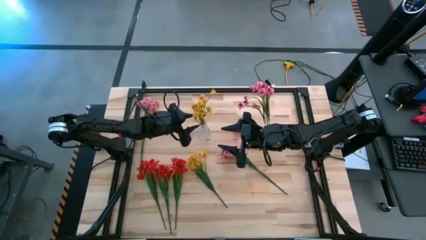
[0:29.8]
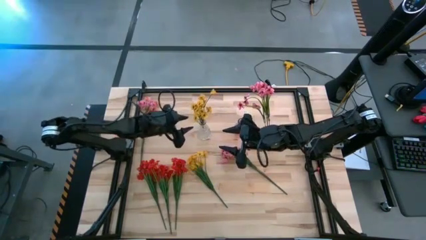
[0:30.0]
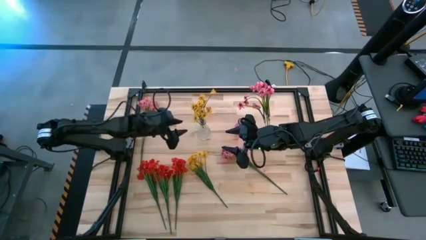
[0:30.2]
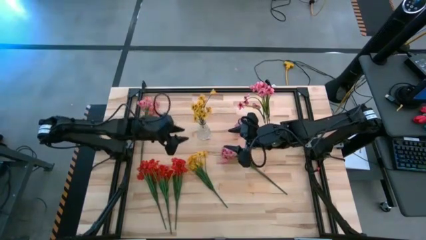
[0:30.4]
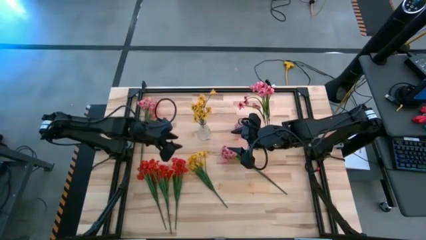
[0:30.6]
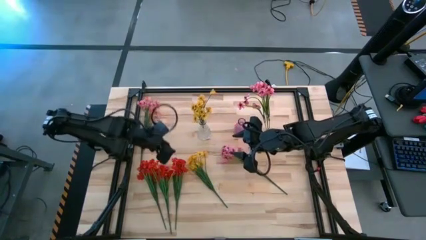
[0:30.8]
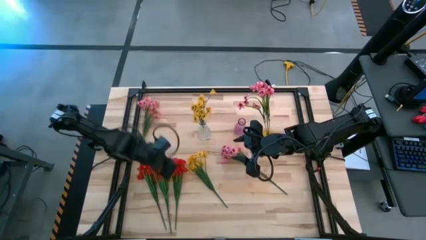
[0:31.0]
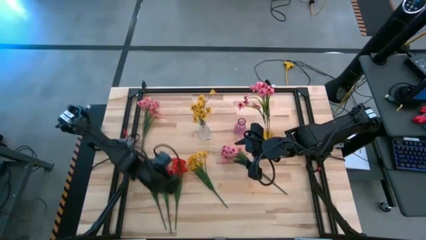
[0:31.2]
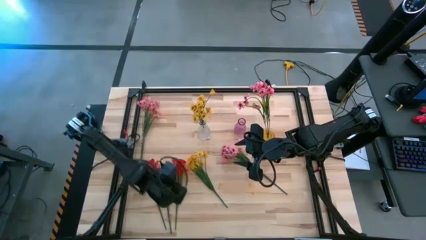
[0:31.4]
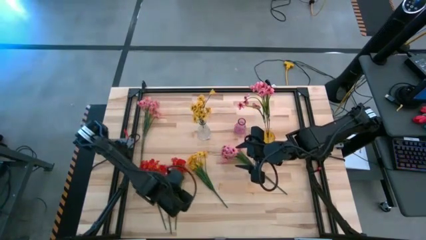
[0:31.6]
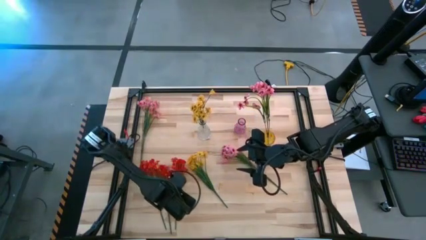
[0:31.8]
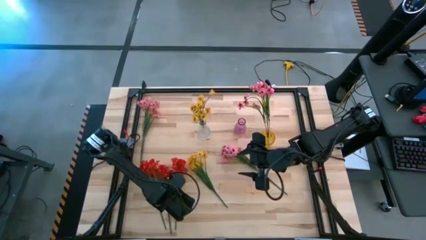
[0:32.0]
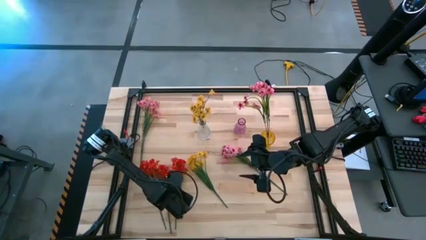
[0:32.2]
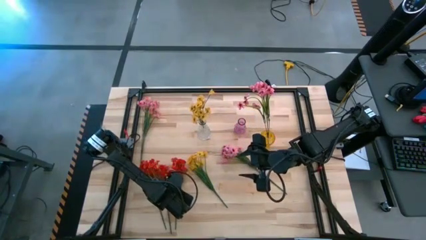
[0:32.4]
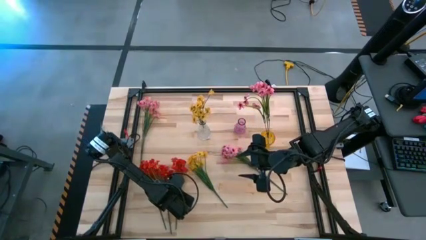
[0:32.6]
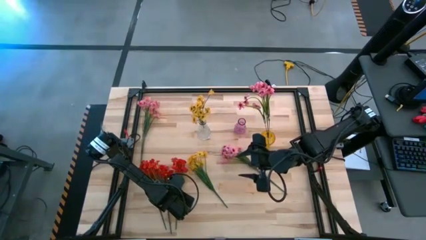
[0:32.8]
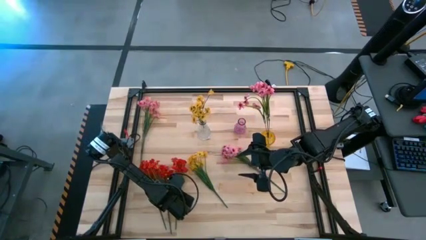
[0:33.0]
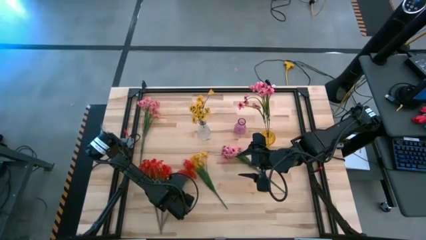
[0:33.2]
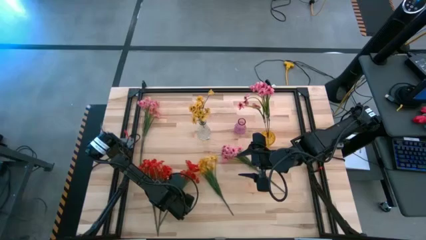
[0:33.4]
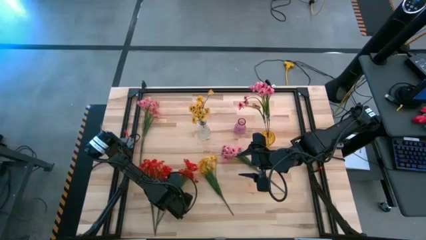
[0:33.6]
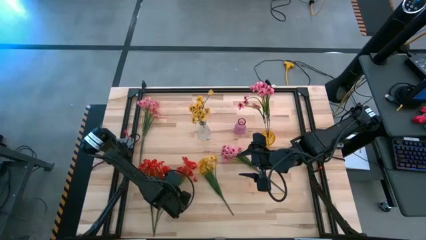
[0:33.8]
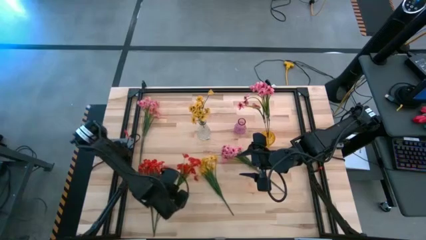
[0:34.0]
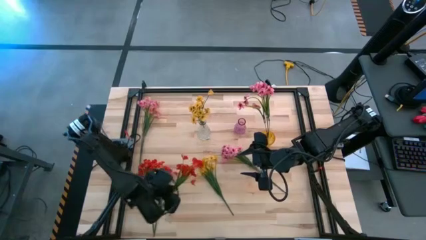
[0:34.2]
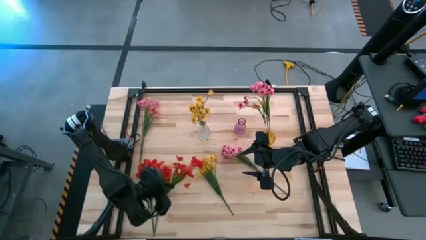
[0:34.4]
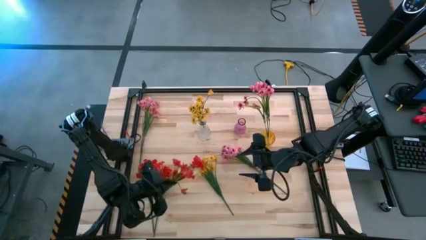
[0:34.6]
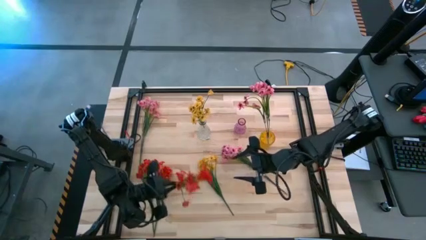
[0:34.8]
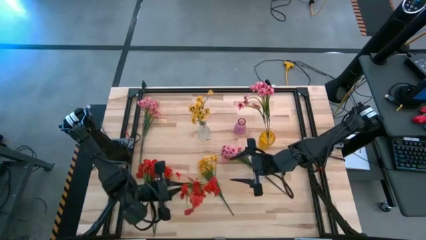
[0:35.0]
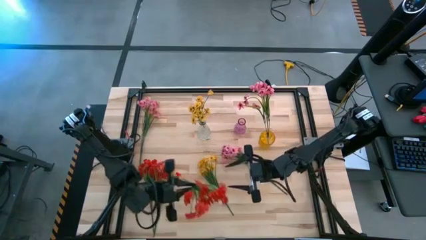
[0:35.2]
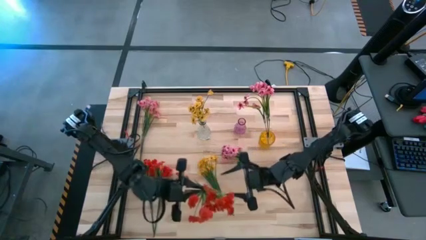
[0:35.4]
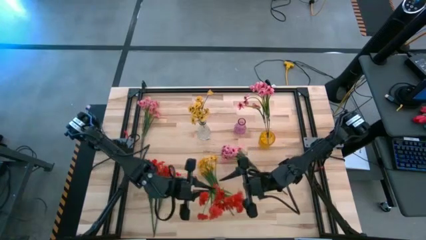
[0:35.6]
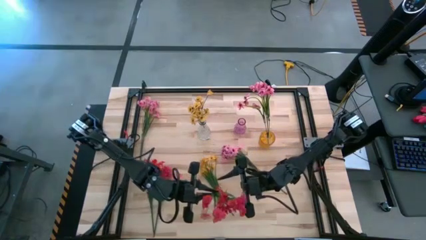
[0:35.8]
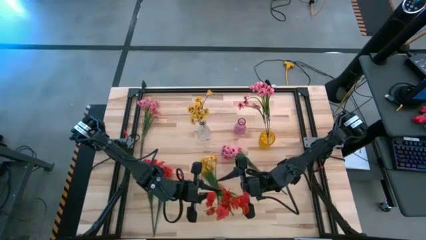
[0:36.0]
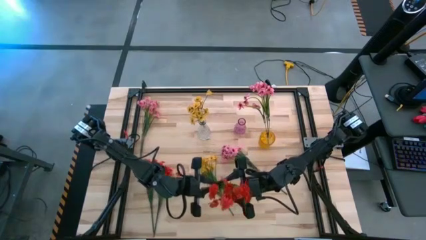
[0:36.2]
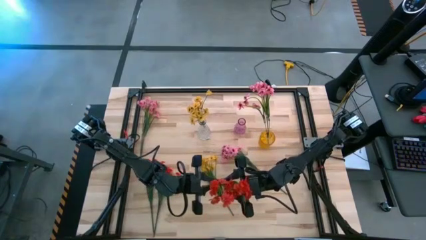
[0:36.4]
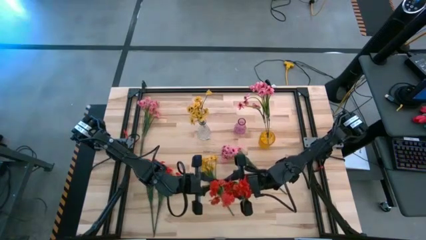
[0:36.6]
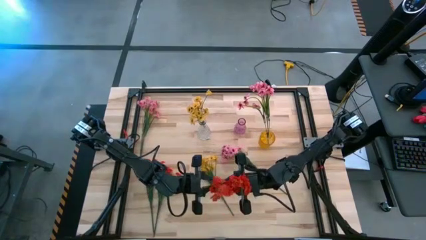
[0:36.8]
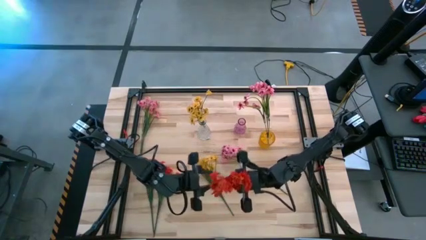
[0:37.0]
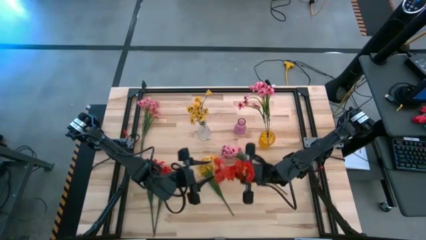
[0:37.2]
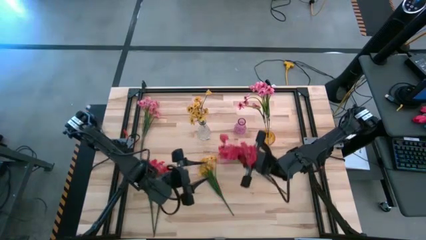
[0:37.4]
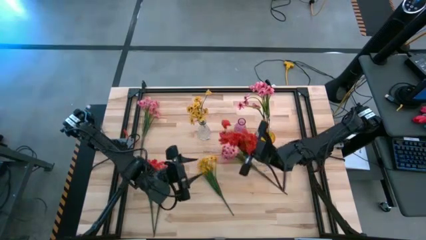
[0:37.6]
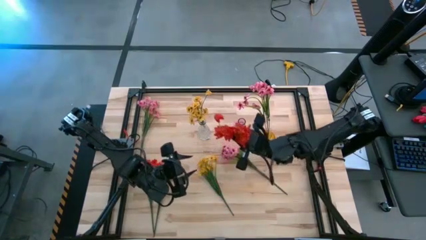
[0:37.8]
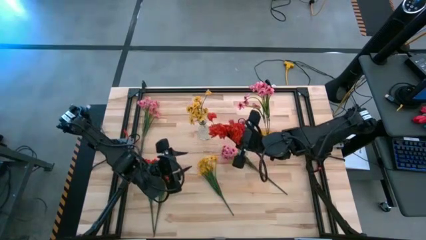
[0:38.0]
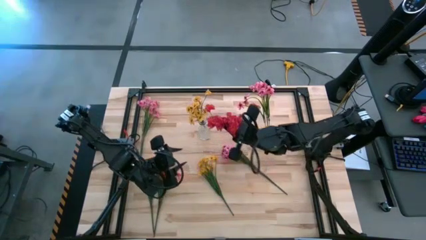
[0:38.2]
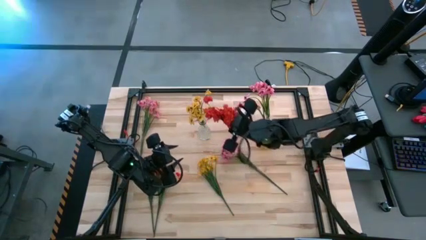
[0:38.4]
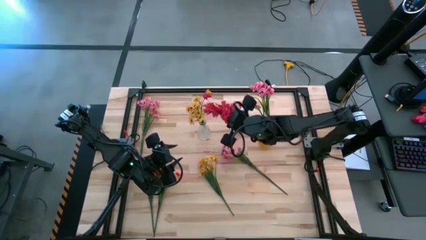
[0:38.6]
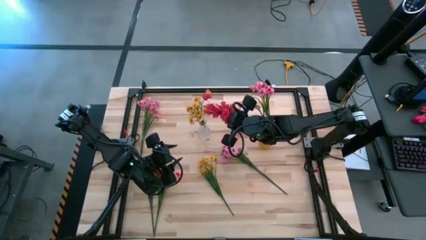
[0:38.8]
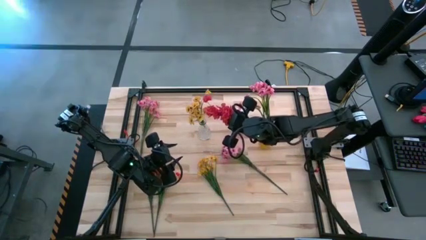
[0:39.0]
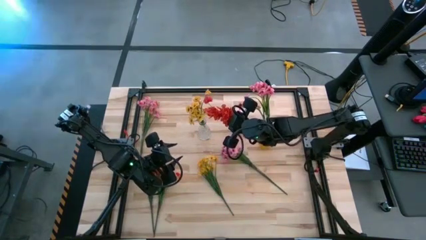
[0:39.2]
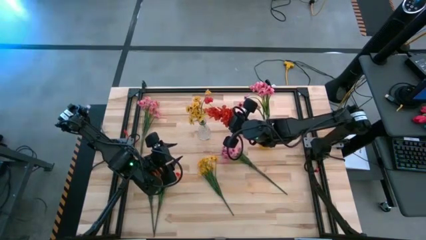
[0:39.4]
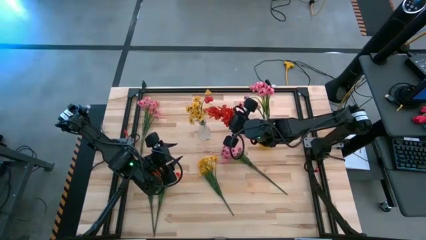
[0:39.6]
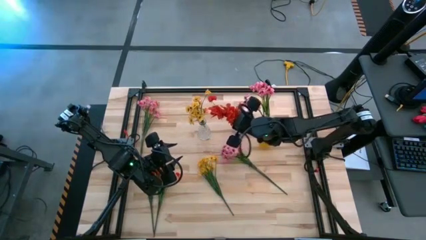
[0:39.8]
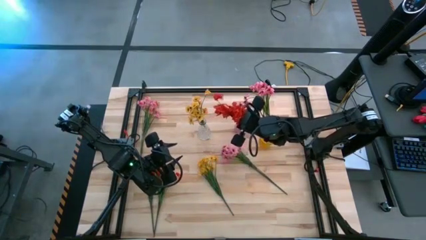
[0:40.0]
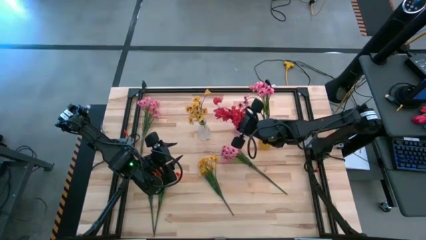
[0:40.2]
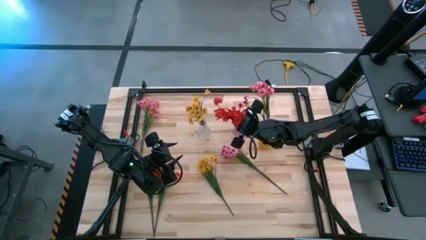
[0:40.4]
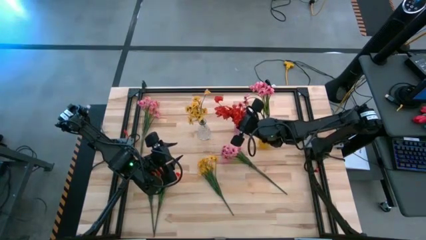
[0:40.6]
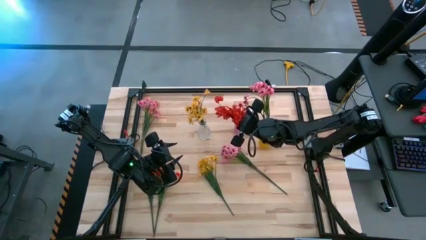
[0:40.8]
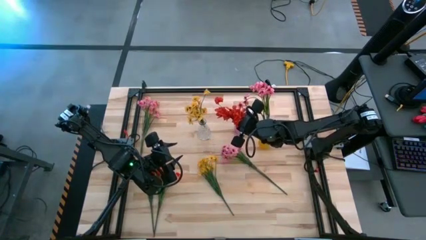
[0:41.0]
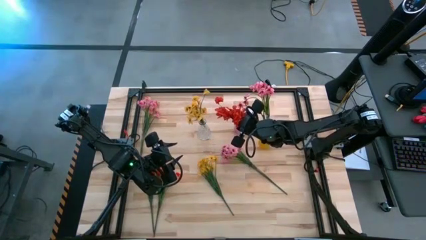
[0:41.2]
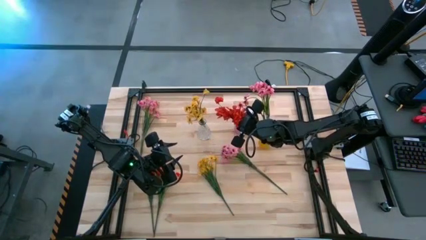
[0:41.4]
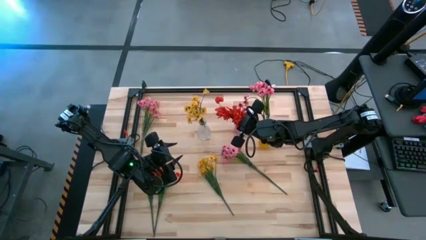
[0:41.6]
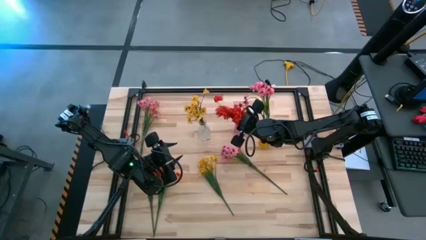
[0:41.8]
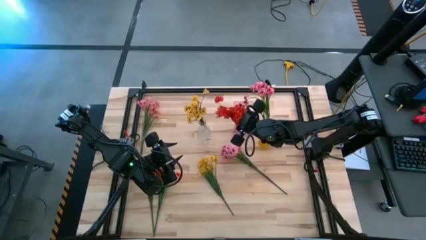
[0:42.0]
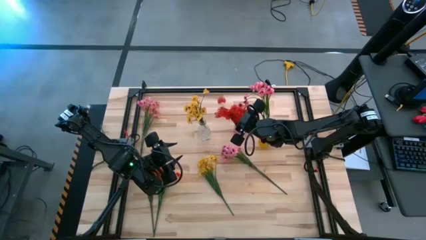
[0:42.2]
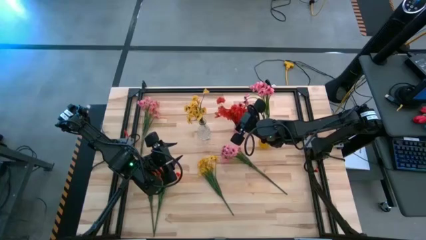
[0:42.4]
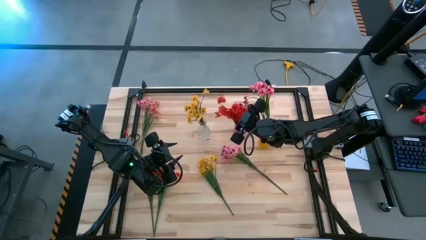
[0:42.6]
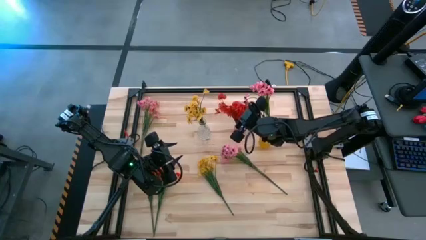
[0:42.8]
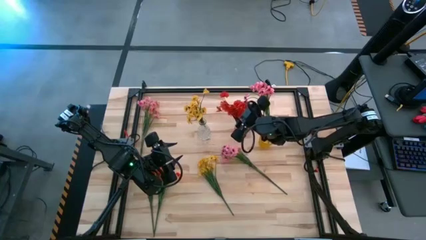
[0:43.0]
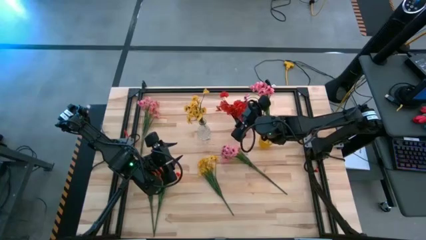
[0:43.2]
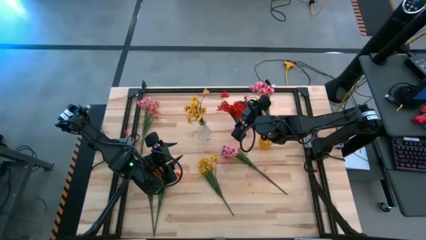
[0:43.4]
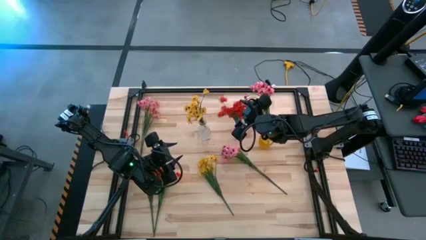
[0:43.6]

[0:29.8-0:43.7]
Task: Sort flowers into vase by color
Put the right red flowers into the pink vase

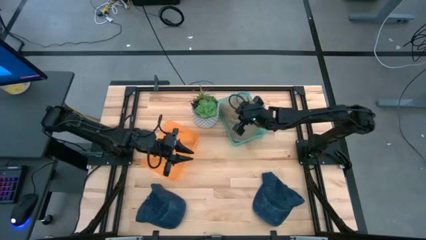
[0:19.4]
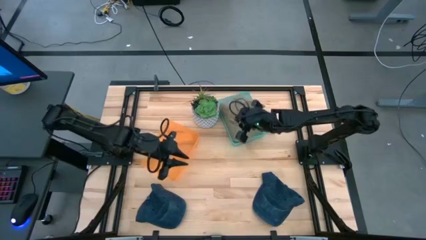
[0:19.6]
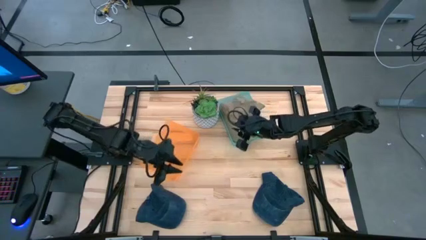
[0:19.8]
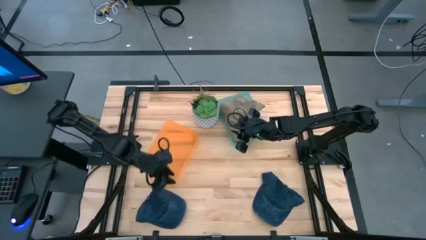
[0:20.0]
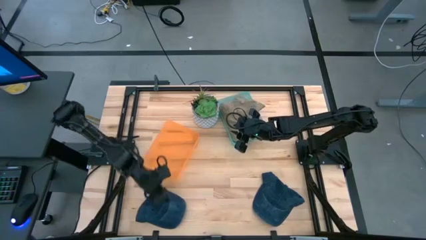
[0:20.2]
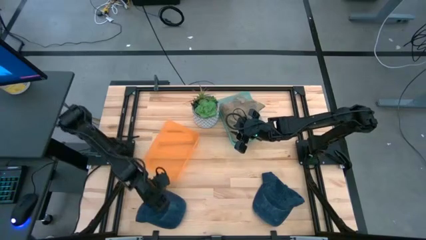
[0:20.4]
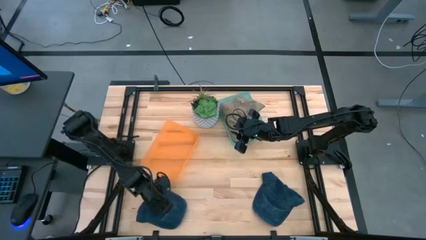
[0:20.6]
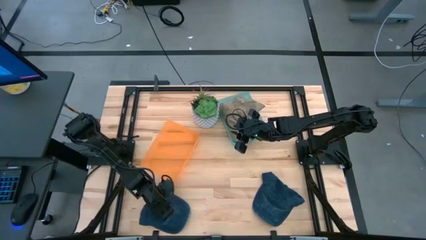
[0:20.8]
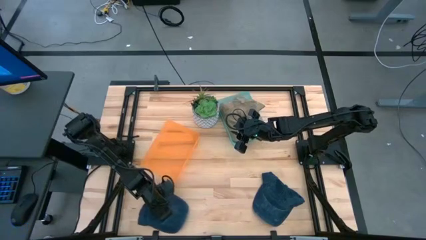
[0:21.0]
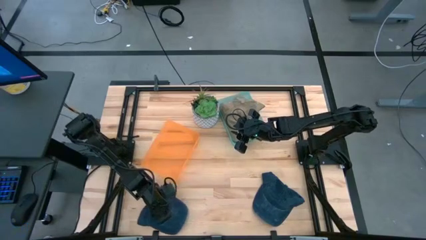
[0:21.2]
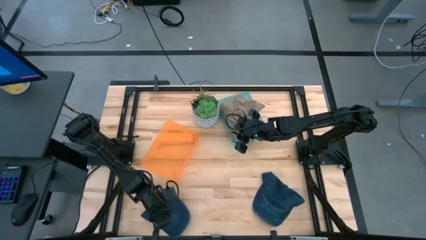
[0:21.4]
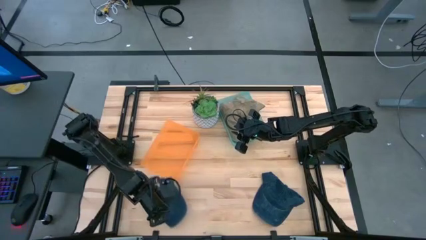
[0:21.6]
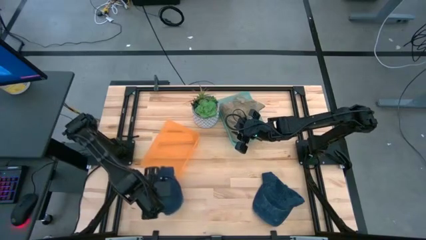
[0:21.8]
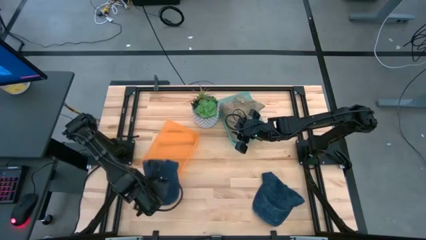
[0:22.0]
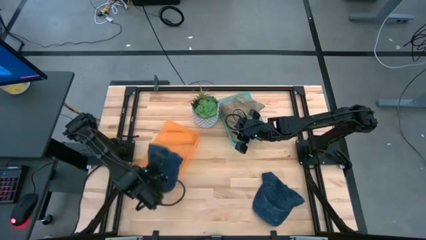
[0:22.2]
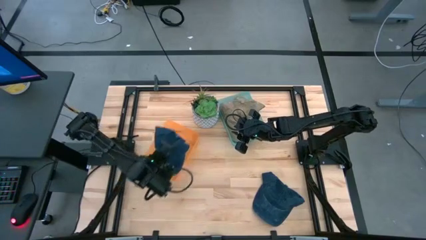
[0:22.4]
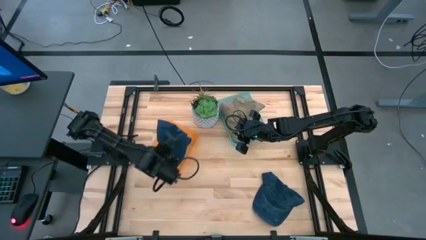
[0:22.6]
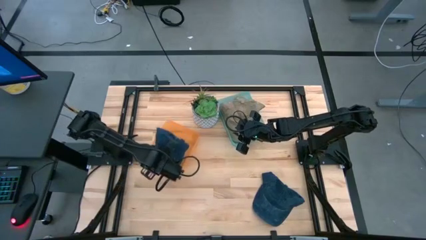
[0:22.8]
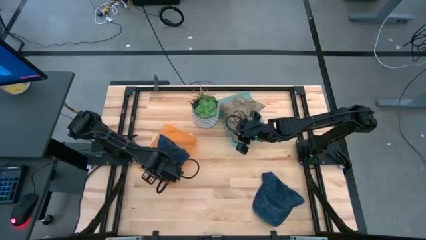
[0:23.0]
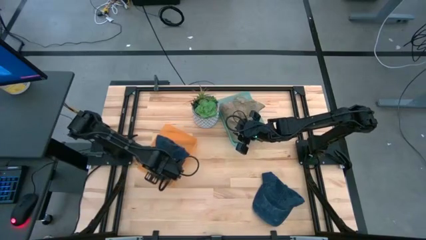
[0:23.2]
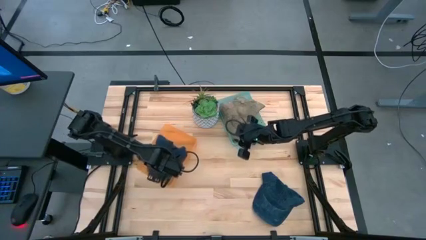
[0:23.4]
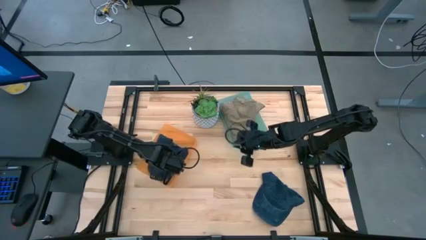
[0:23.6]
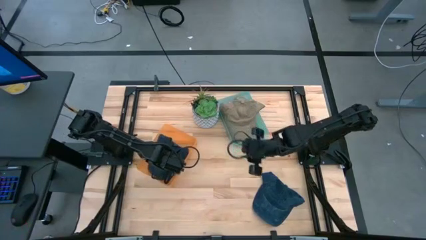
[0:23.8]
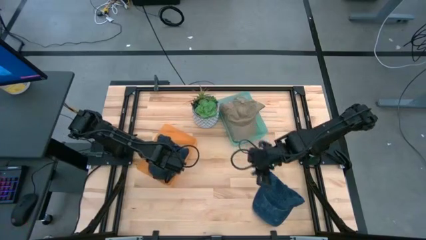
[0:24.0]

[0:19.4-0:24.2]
Task: Pick & Place hat
Put the left blue cap into the orange bin
